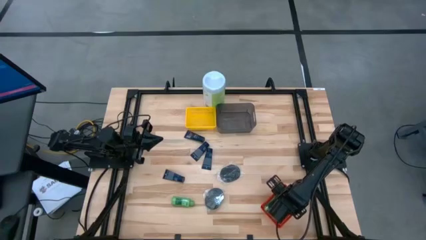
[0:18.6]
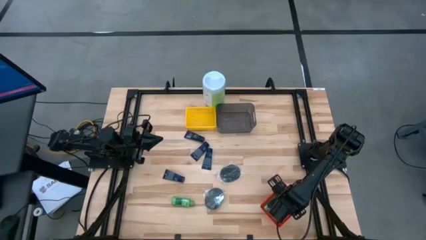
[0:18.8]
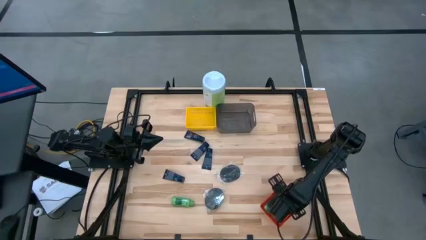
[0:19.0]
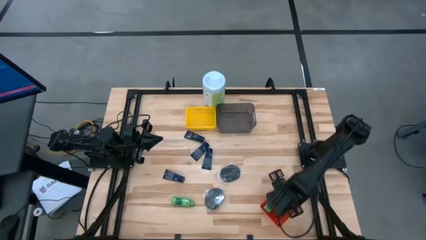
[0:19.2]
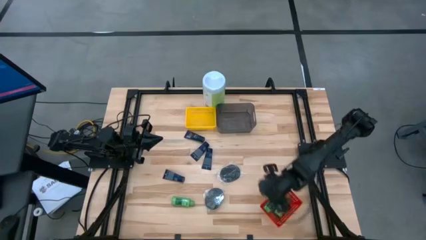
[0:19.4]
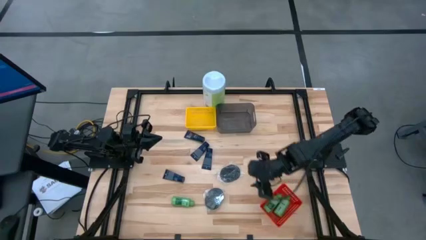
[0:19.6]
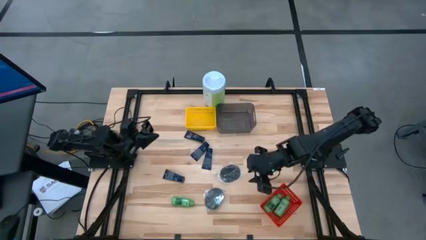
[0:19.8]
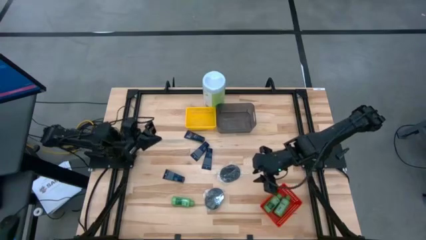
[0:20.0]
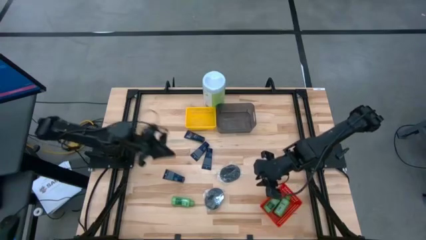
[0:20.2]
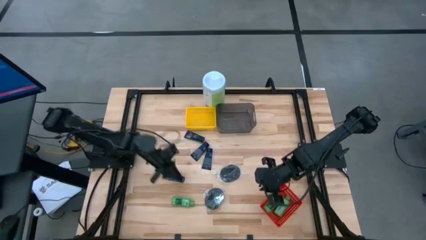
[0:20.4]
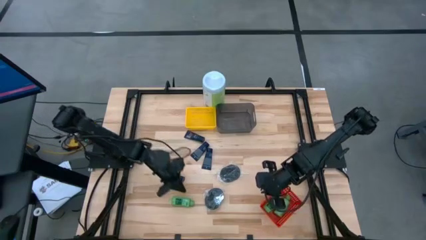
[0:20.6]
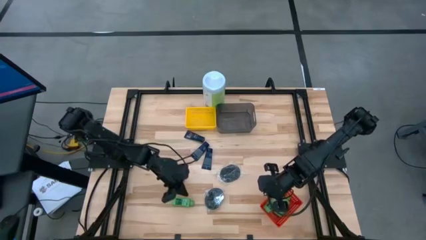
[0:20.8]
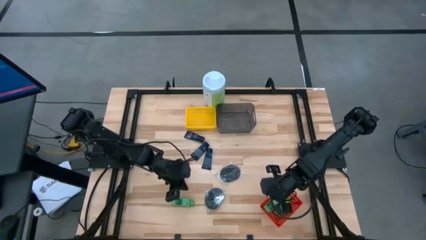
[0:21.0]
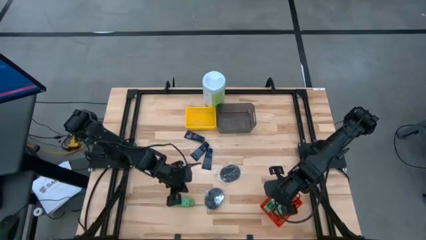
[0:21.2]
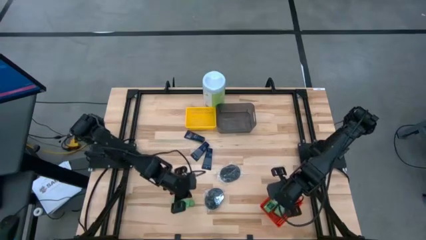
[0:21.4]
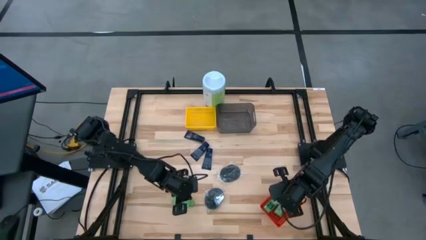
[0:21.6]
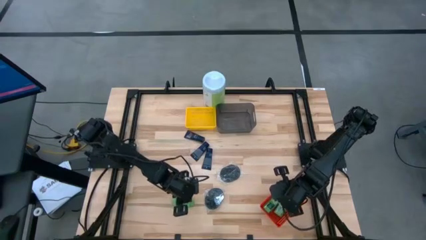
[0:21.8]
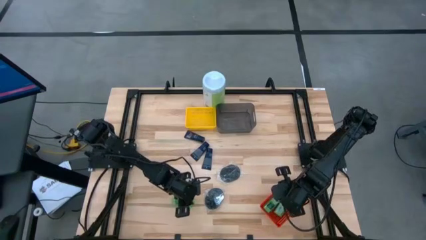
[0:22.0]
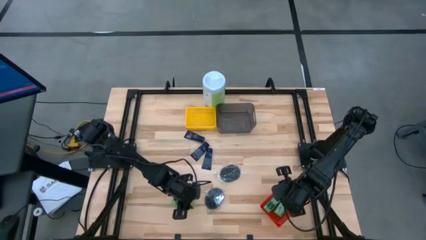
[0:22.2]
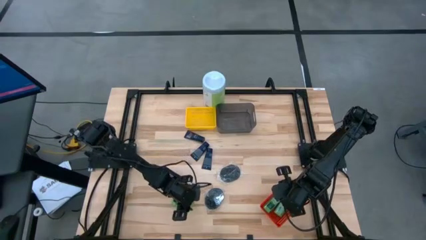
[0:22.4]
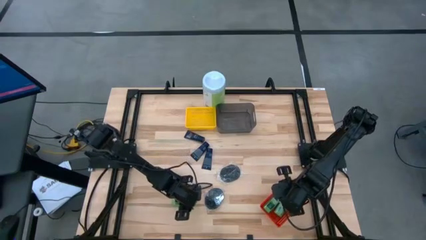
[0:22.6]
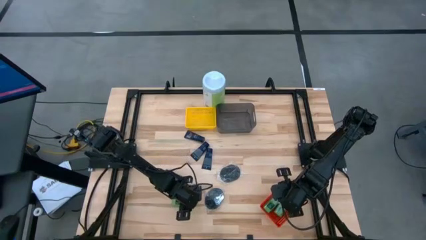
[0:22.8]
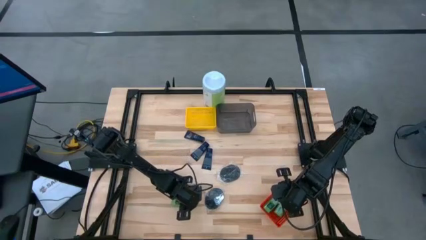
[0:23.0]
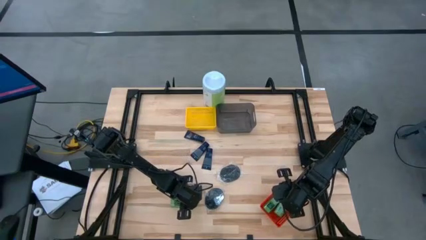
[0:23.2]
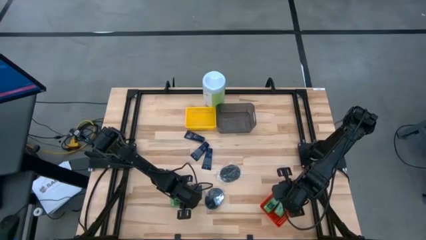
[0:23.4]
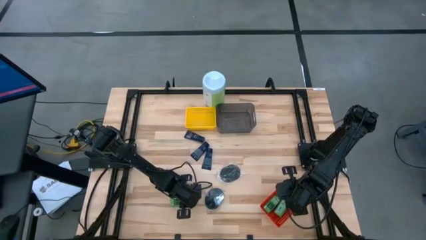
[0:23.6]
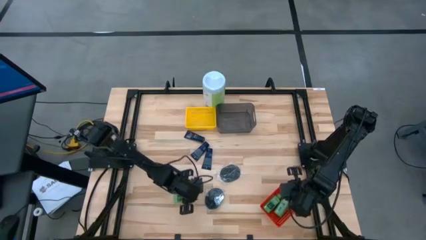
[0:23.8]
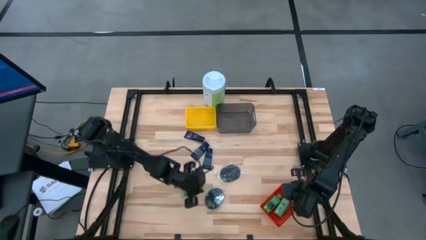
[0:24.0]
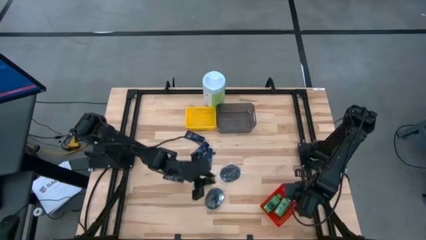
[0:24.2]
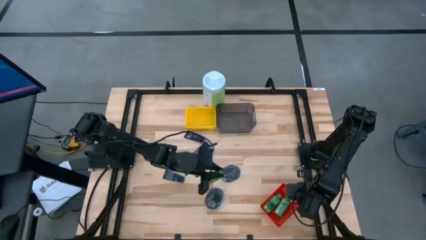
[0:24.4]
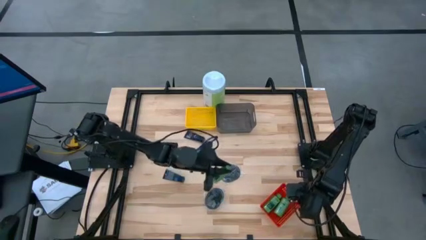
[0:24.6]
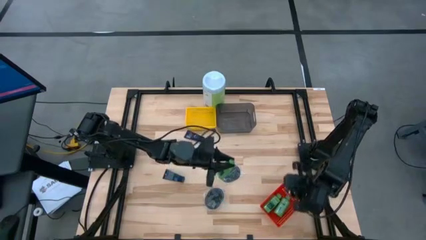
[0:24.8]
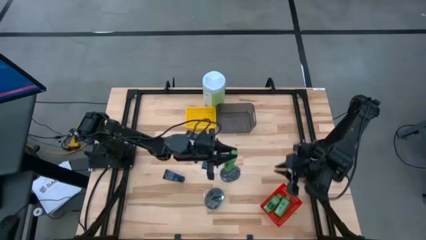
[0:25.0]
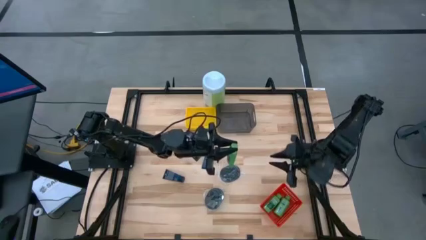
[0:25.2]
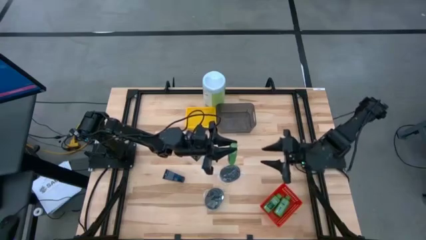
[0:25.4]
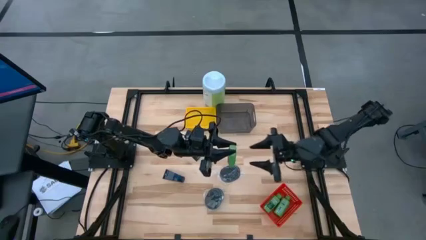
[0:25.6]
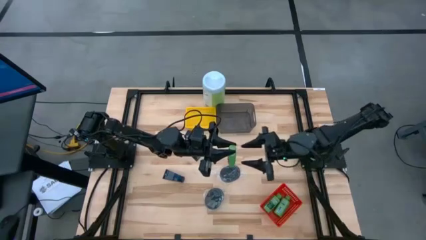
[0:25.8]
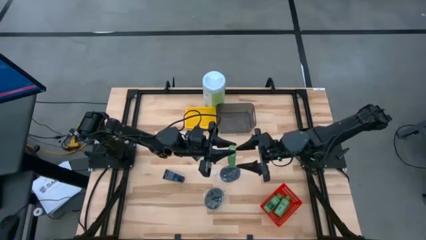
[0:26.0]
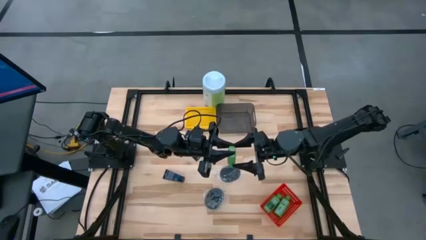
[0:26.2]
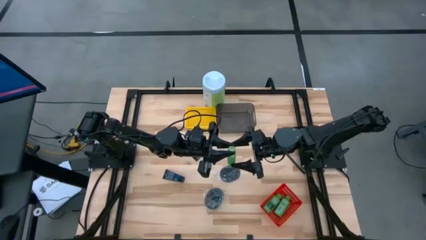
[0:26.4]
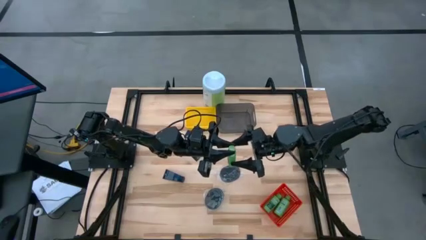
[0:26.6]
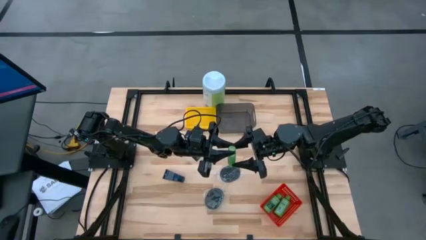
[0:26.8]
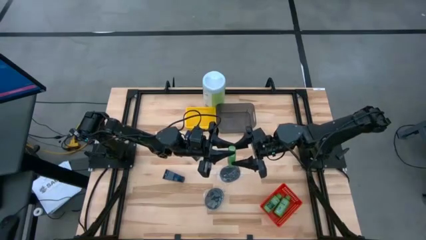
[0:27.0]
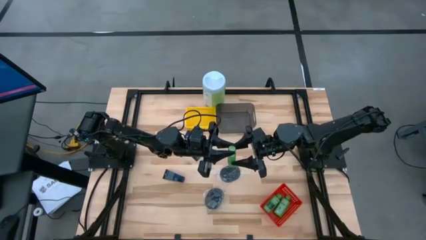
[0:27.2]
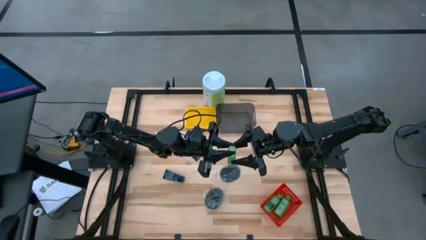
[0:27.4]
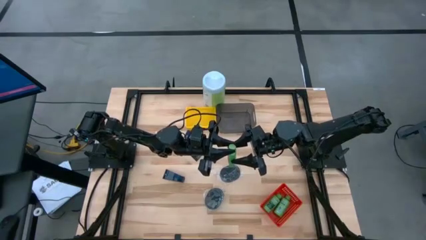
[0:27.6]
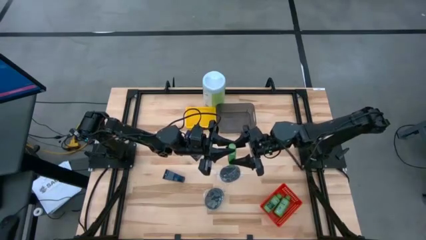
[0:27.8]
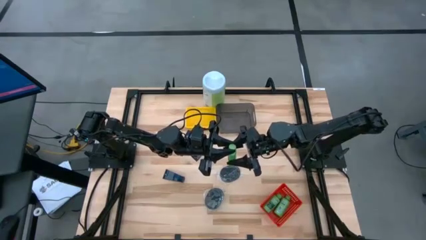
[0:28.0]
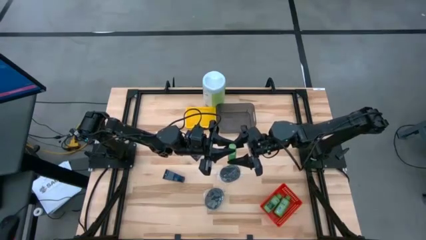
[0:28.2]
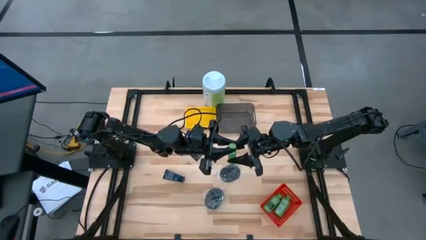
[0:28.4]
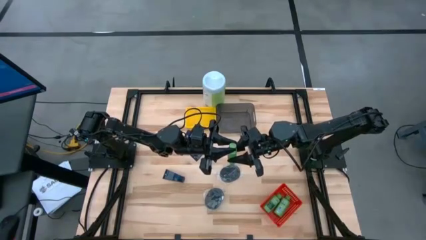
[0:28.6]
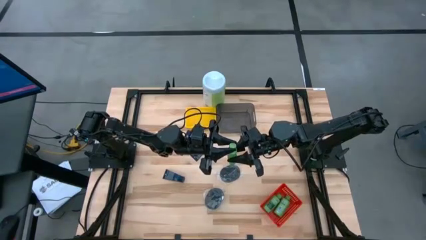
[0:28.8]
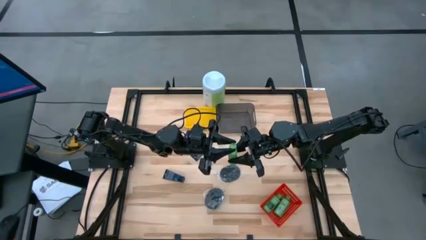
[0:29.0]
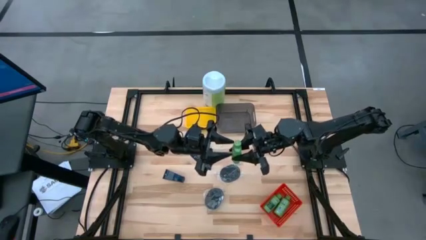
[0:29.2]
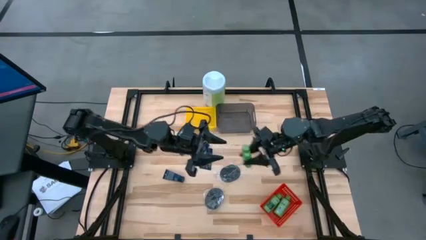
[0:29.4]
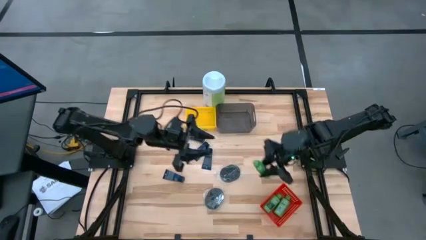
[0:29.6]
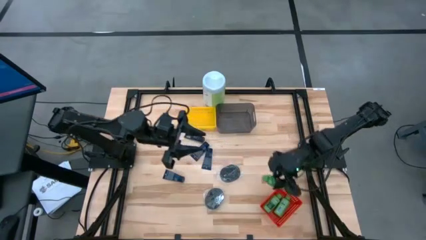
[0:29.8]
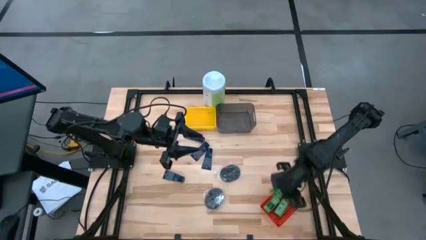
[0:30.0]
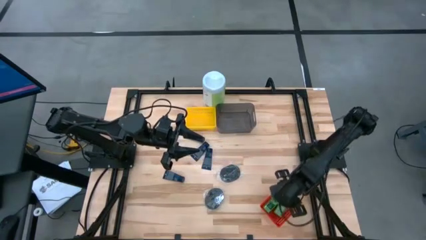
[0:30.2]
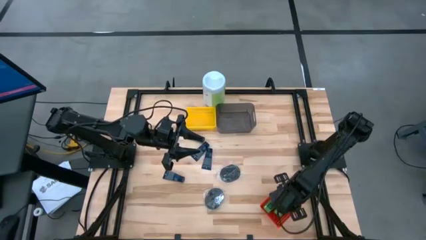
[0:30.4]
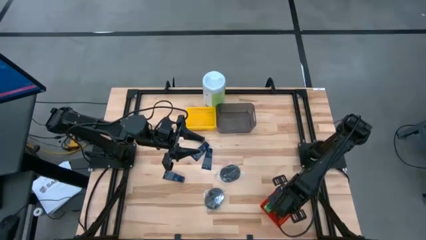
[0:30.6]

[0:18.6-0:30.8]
Task: Pick & Place Travel size toiletries
Put the green shampoo bottle into the red basket

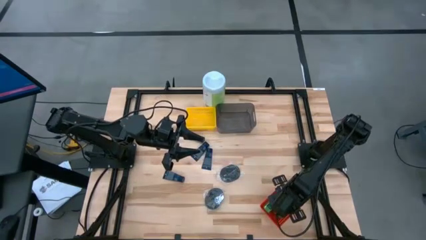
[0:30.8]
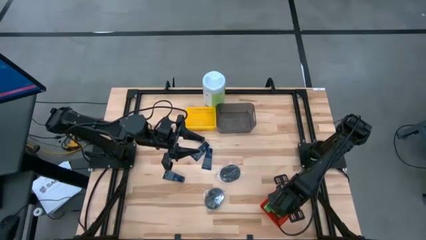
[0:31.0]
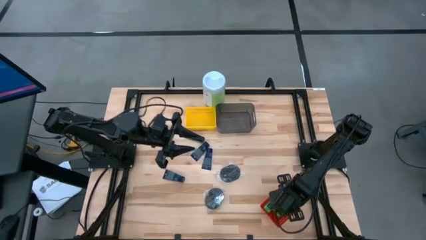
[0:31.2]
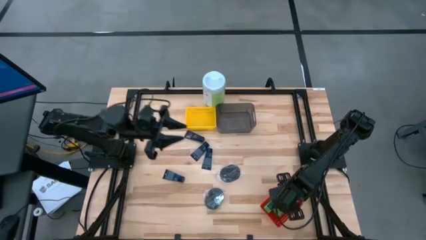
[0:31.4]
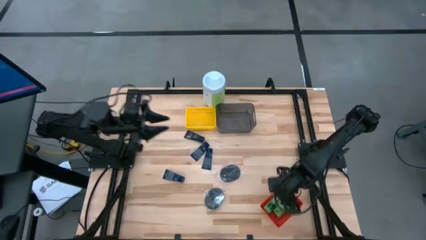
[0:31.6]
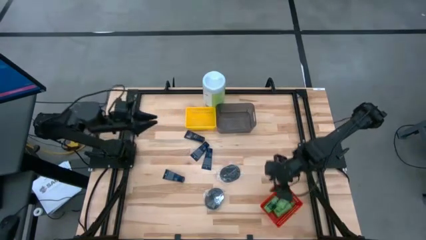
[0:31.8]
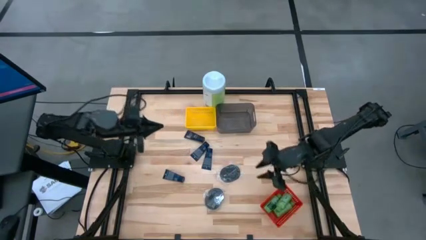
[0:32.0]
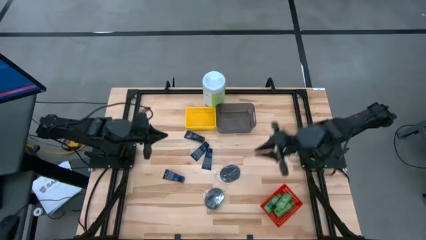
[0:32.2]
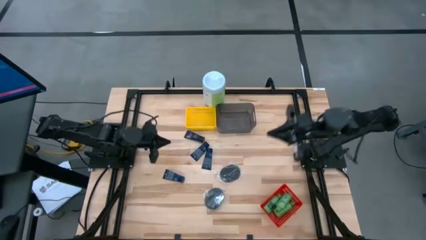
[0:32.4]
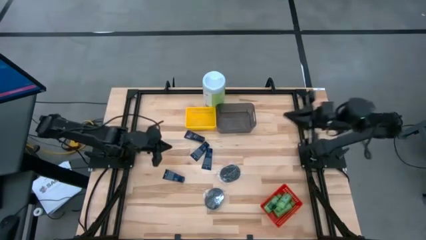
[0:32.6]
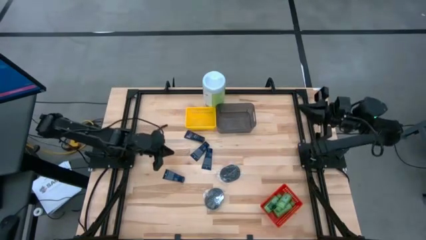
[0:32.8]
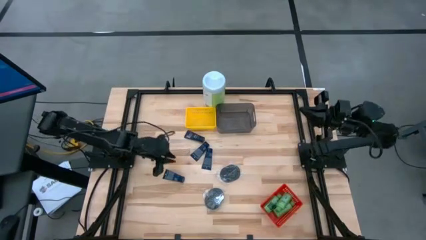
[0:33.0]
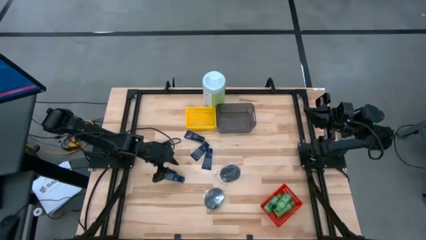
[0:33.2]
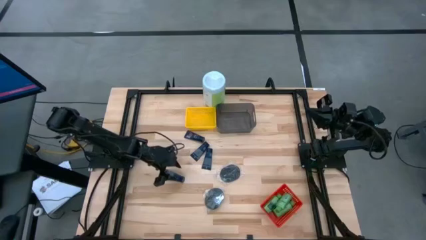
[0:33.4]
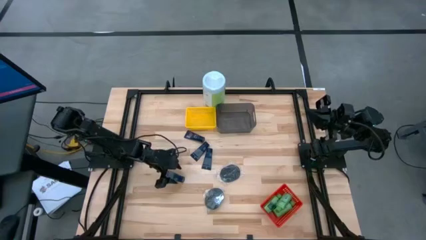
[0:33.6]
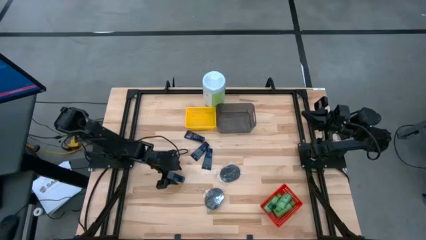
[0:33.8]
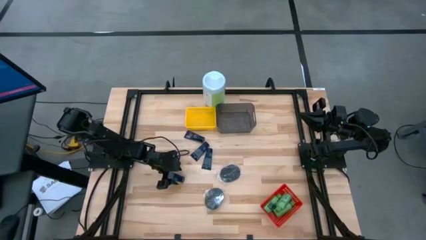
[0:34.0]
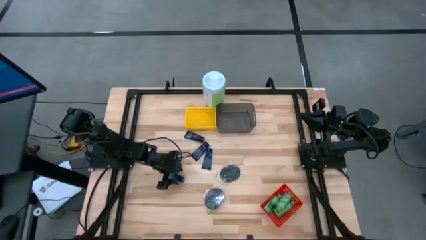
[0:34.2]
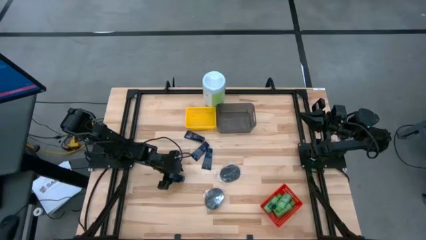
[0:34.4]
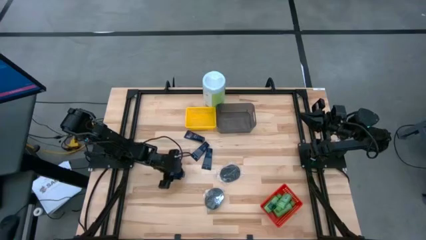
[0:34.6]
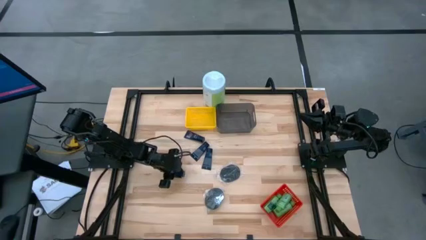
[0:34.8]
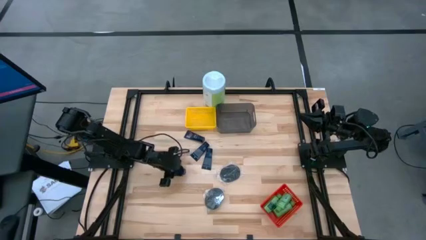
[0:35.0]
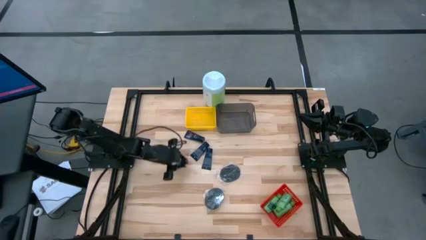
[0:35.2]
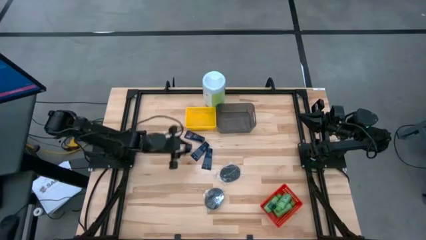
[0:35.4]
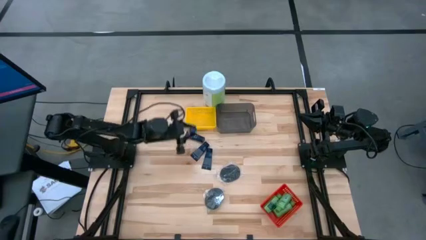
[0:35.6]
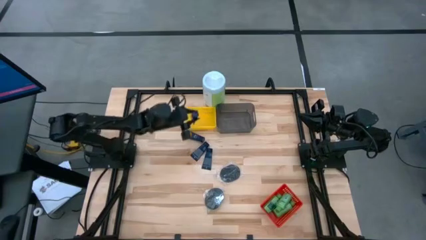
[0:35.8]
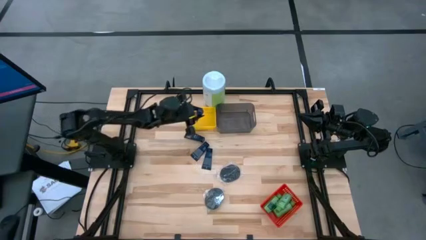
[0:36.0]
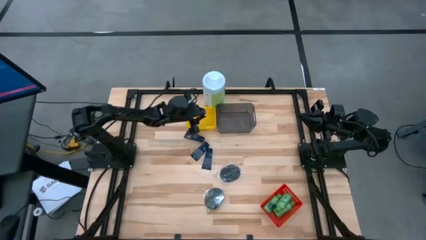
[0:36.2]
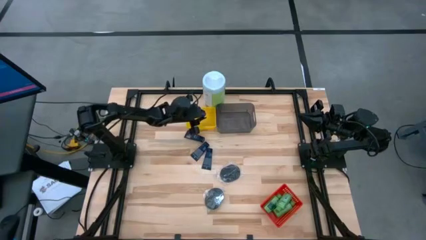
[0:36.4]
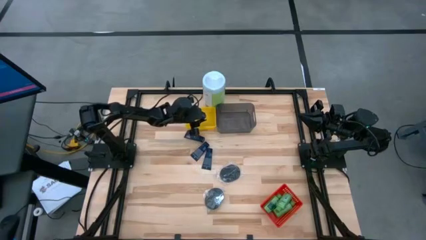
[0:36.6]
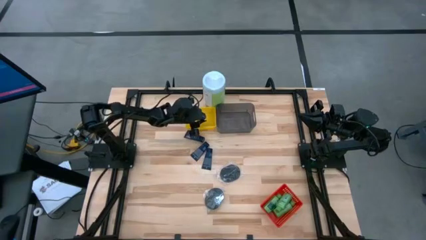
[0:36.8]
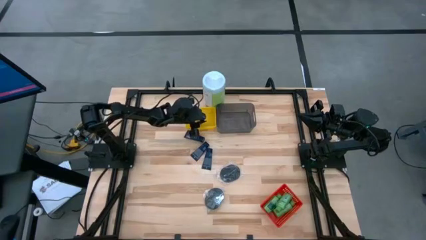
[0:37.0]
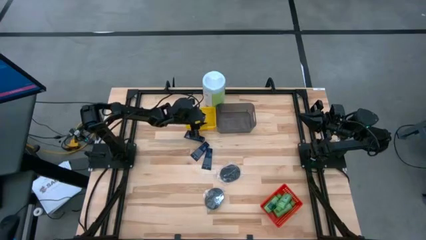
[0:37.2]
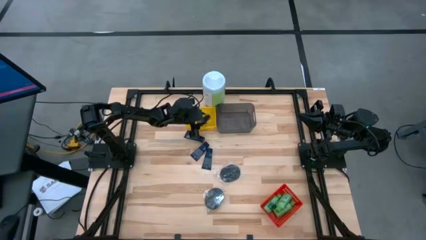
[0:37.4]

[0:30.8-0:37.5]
Put the dark blue shaving cream into the yellow basket
